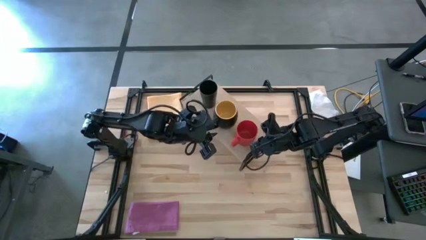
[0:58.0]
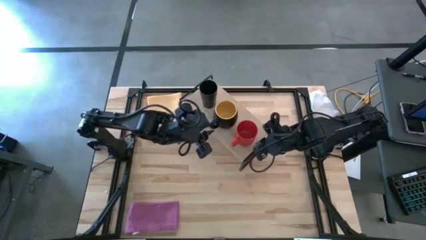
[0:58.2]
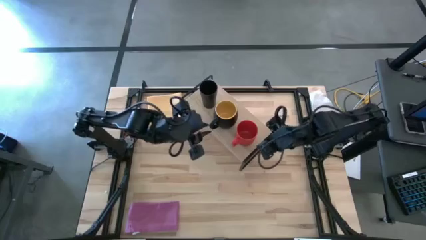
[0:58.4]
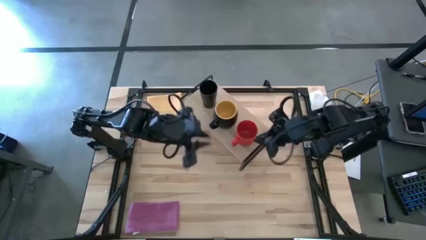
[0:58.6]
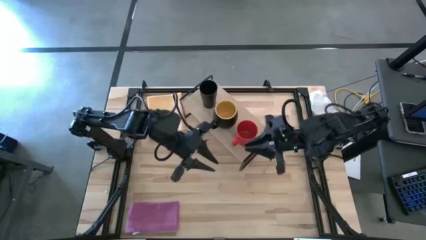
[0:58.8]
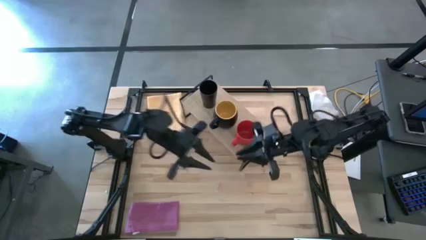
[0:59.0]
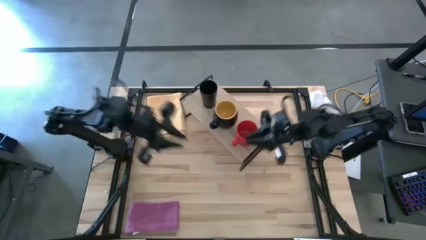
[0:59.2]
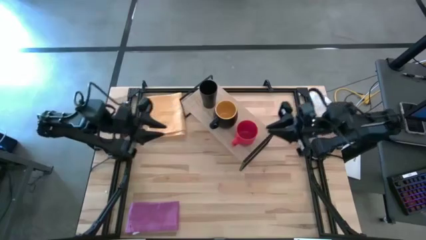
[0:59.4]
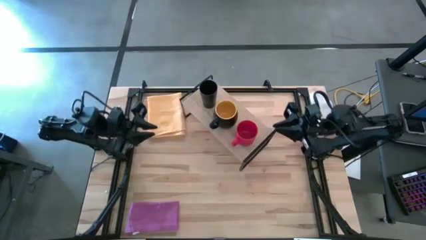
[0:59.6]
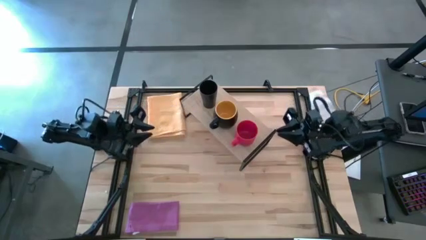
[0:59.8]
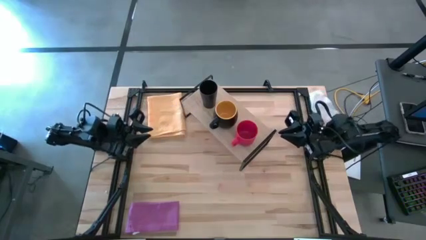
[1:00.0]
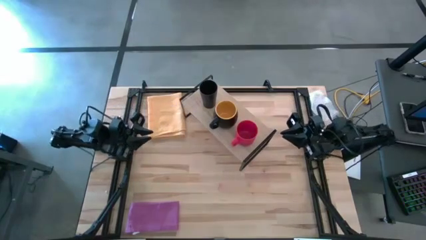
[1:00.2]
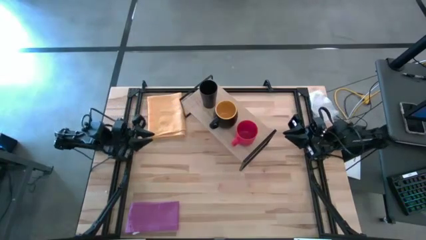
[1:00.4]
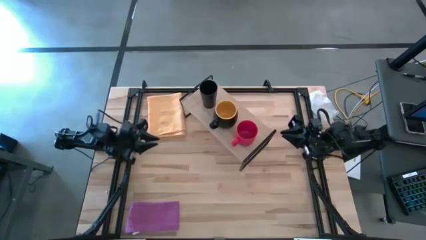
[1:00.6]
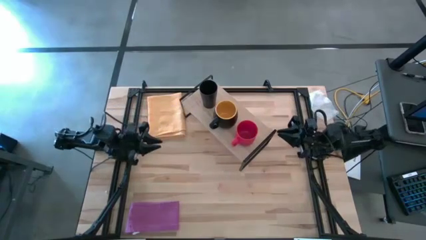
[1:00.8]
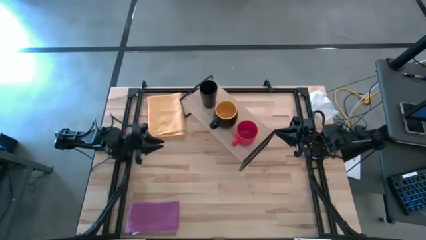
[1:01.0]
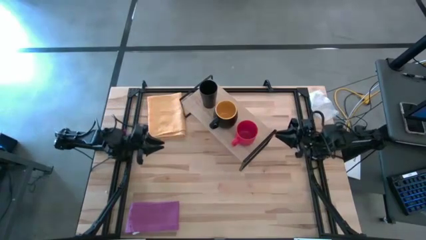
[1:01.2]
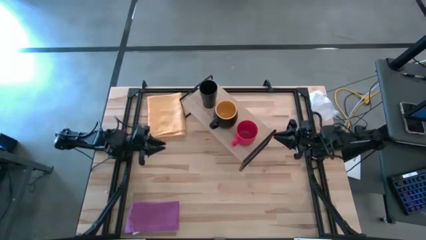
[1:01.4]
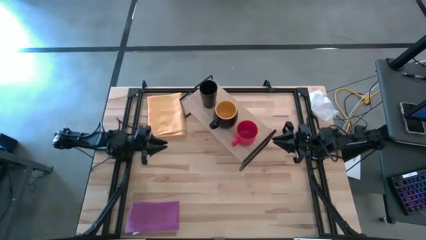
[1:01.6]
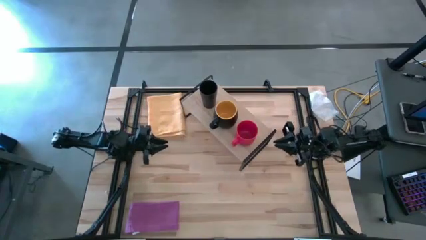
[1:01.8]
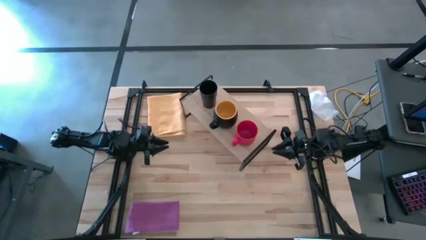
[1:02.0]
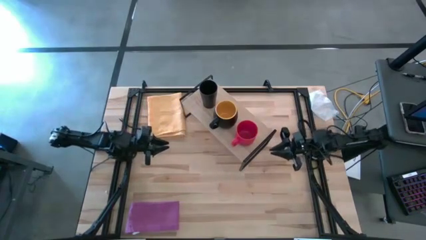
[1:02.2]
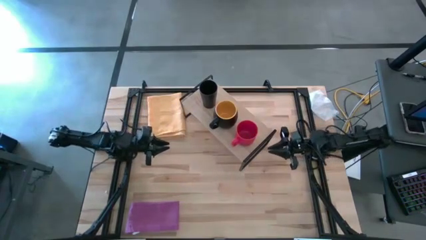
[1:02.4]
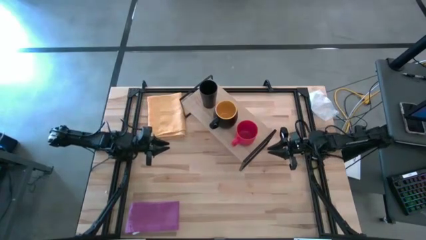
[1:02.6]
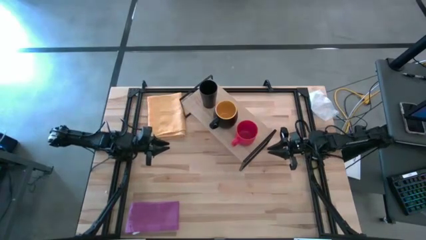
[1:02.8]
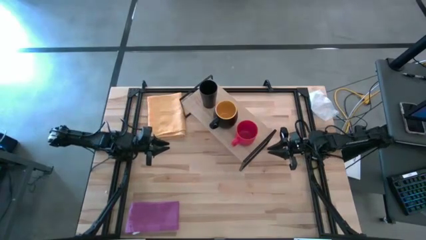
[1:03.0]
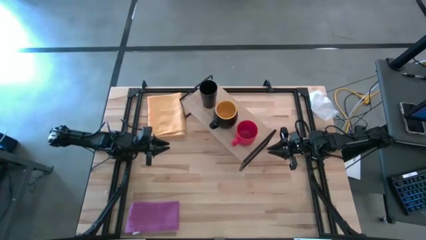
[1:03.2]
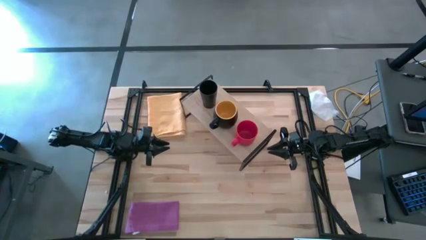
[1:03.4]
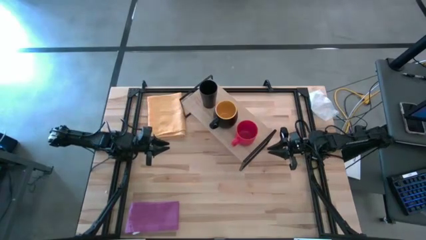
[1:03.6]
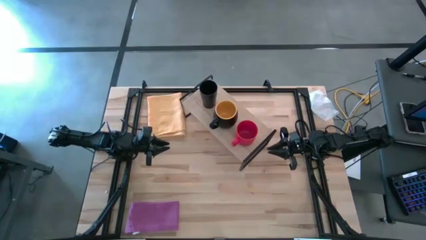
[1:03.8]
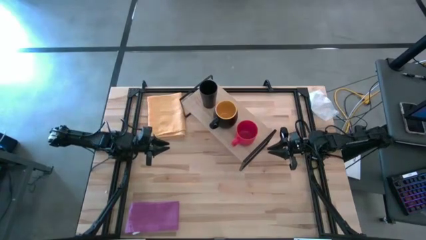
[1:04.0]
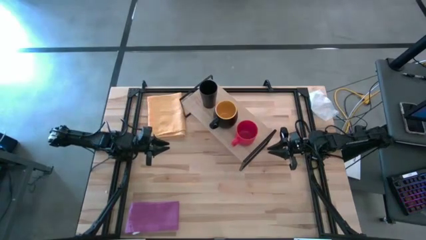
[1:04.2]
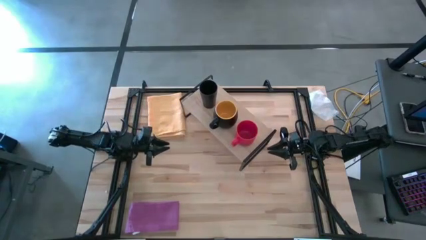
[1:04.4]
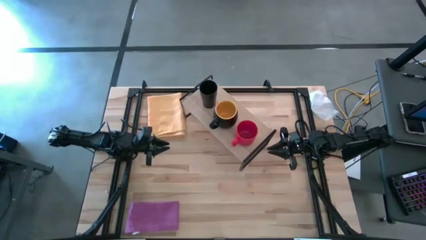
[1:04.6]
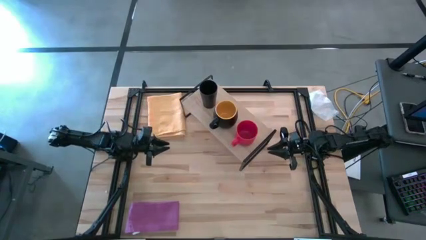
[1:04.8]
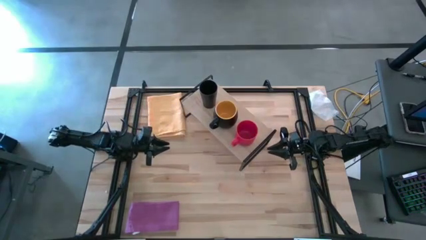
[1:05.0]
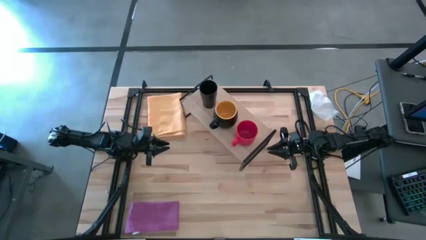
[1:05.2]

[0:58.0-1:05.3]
Task: Stack small to large cups/mugs on shelf
Return to Home Position

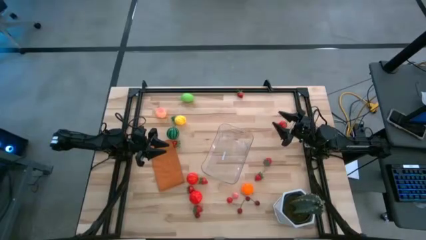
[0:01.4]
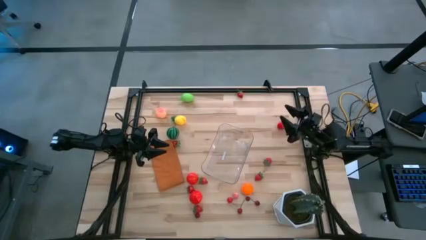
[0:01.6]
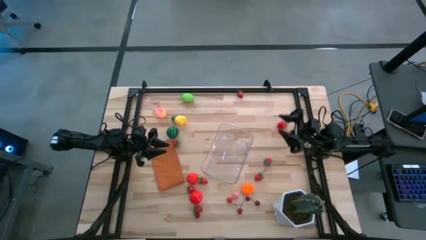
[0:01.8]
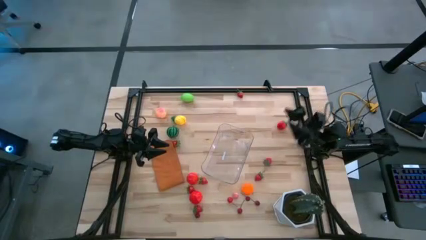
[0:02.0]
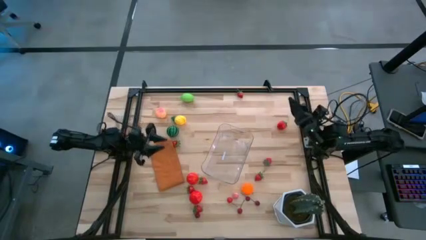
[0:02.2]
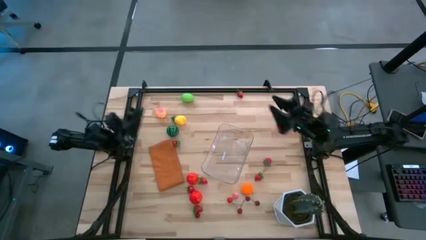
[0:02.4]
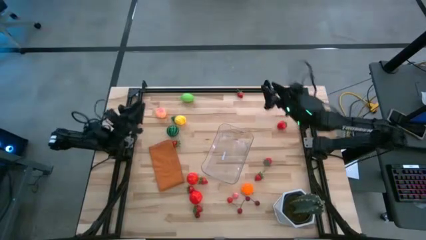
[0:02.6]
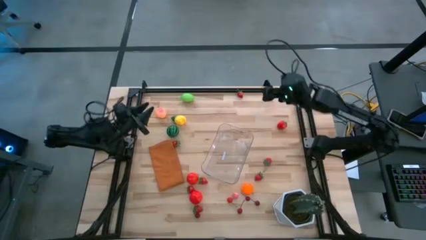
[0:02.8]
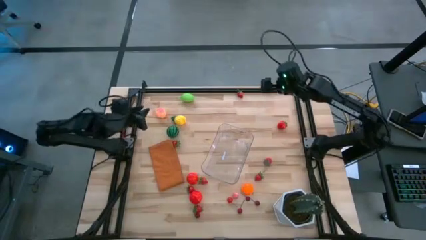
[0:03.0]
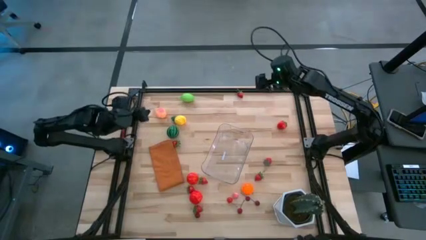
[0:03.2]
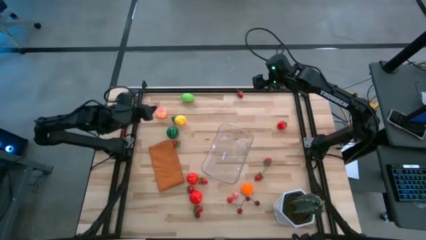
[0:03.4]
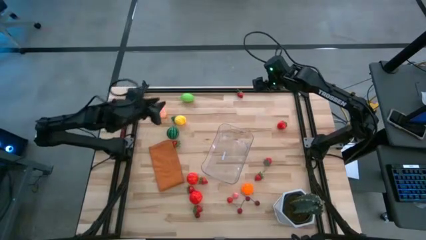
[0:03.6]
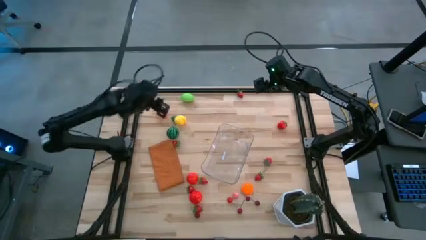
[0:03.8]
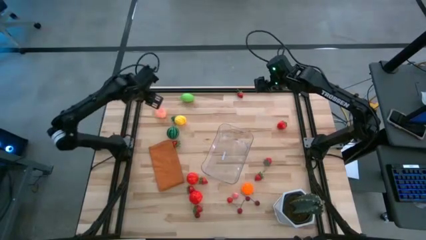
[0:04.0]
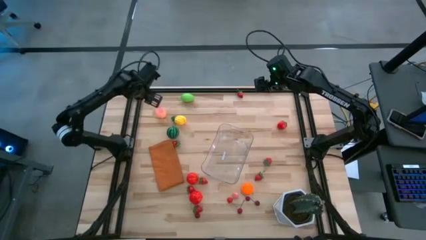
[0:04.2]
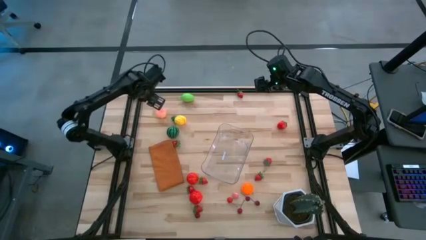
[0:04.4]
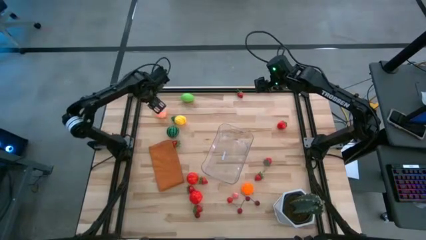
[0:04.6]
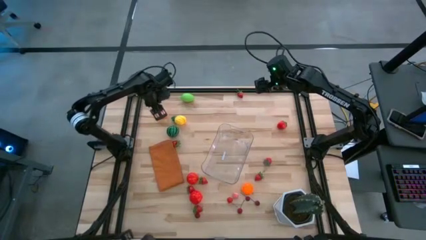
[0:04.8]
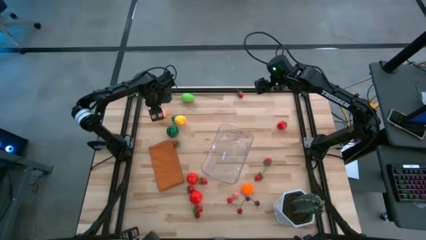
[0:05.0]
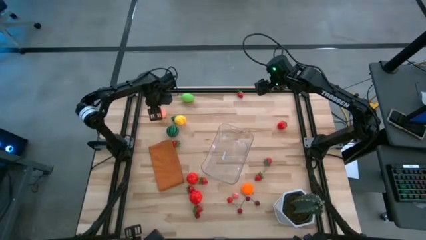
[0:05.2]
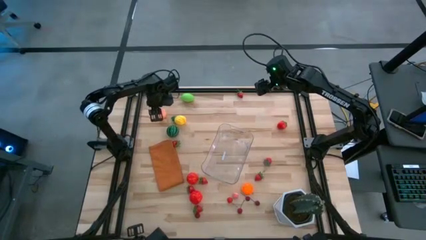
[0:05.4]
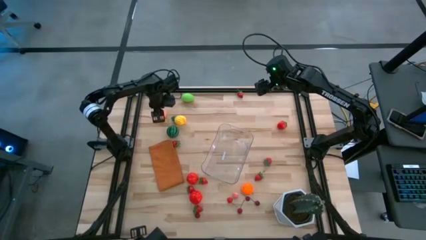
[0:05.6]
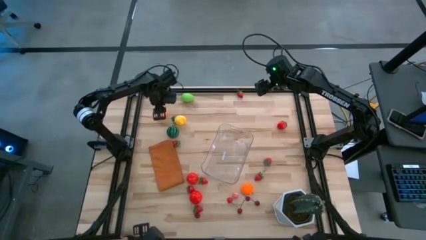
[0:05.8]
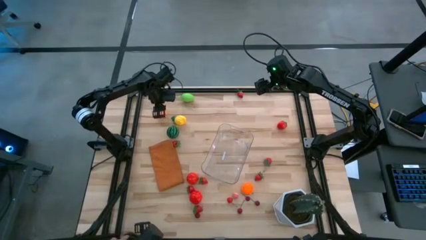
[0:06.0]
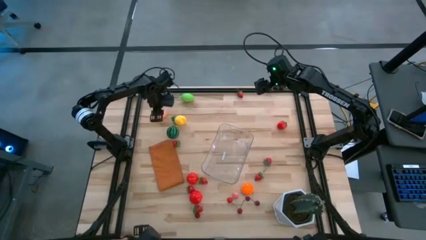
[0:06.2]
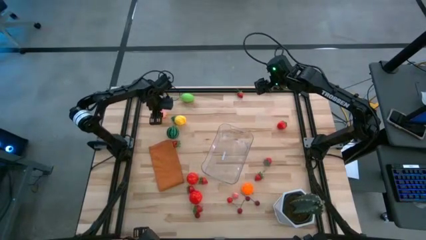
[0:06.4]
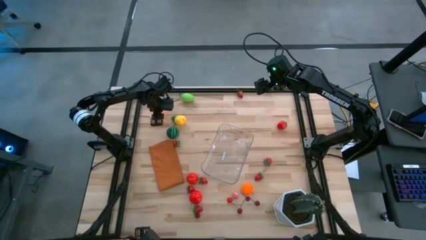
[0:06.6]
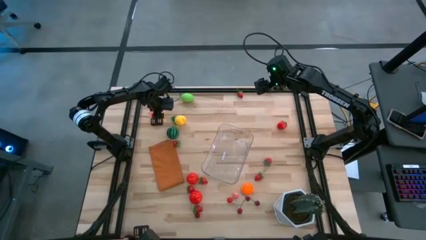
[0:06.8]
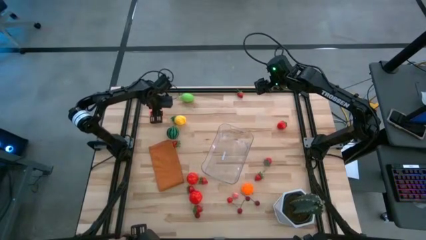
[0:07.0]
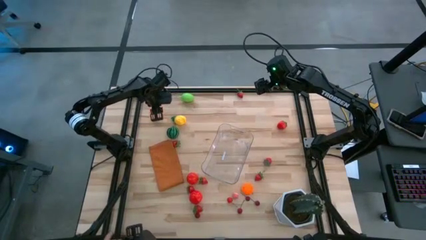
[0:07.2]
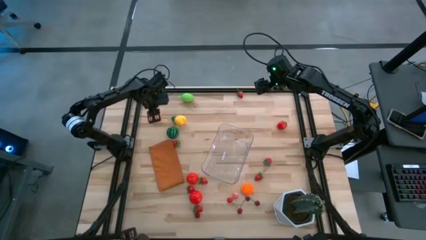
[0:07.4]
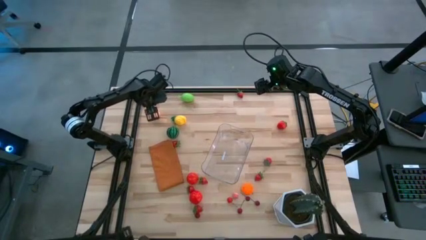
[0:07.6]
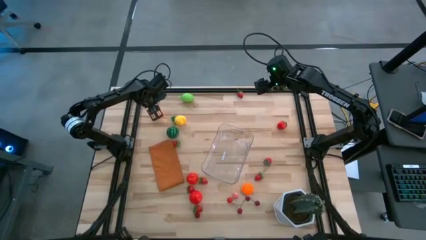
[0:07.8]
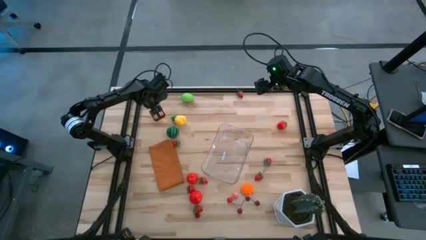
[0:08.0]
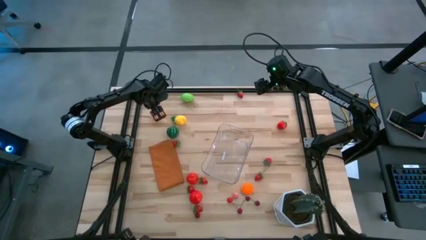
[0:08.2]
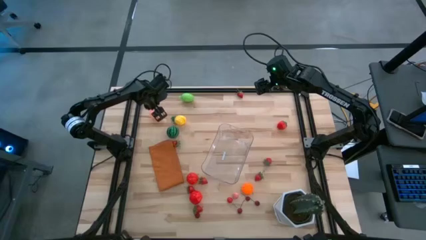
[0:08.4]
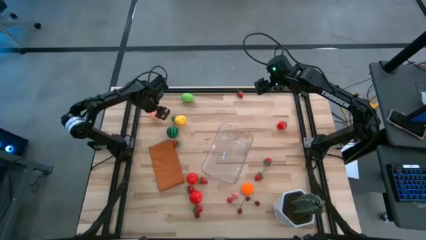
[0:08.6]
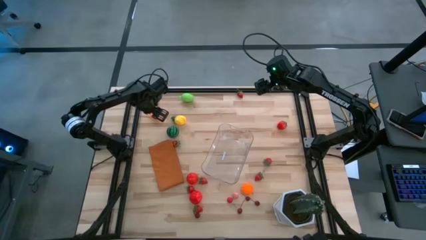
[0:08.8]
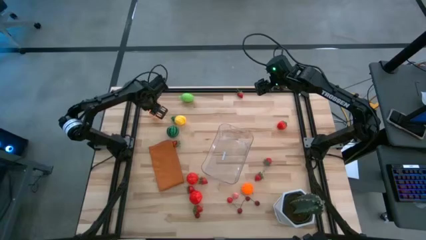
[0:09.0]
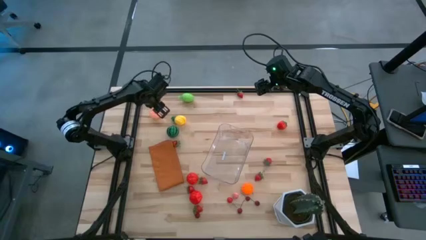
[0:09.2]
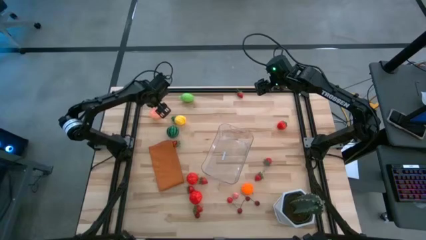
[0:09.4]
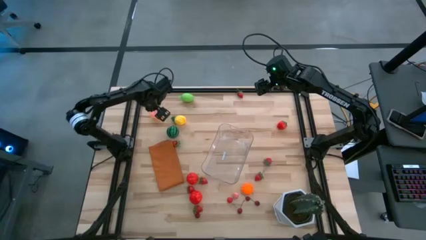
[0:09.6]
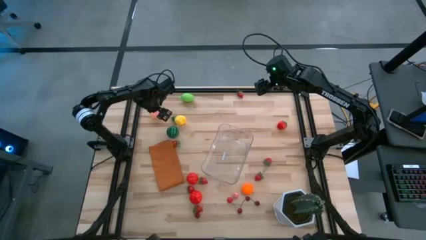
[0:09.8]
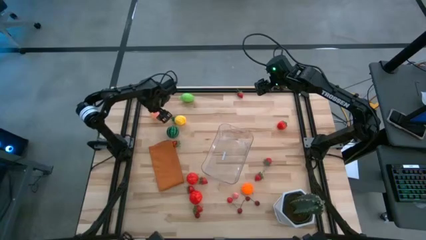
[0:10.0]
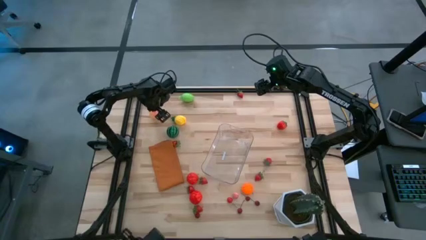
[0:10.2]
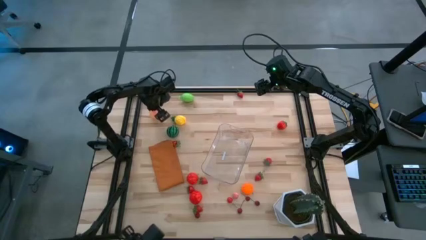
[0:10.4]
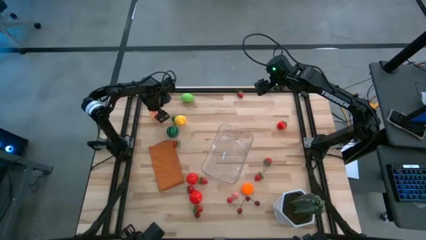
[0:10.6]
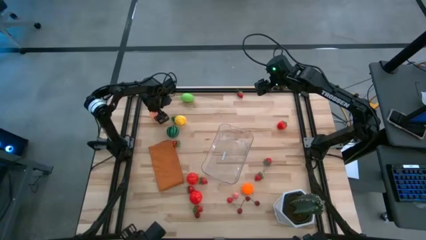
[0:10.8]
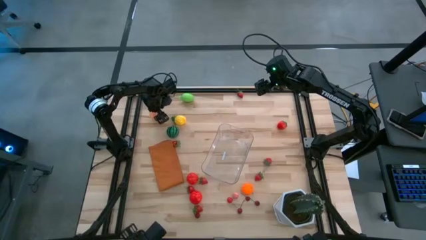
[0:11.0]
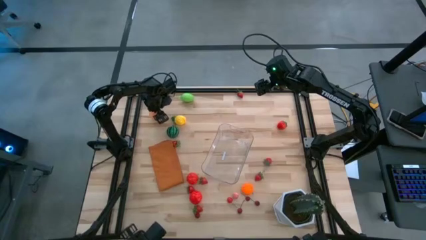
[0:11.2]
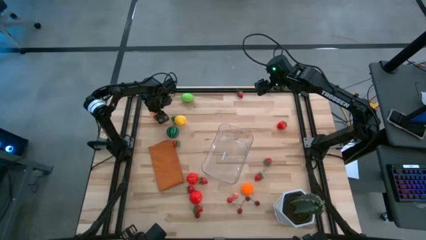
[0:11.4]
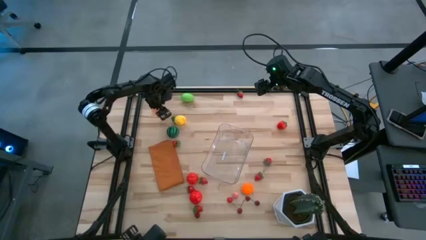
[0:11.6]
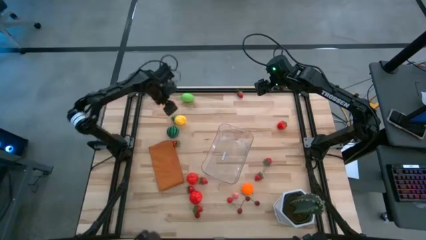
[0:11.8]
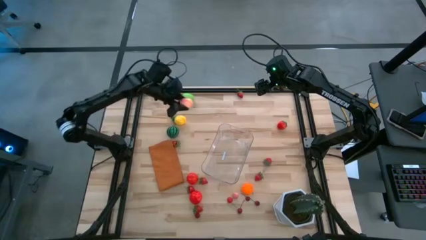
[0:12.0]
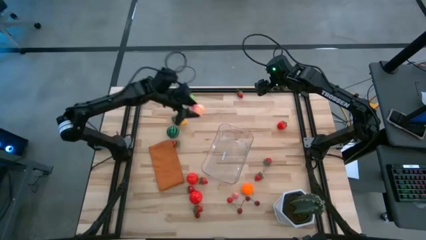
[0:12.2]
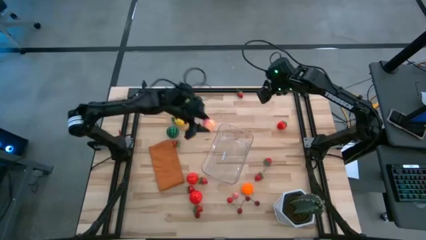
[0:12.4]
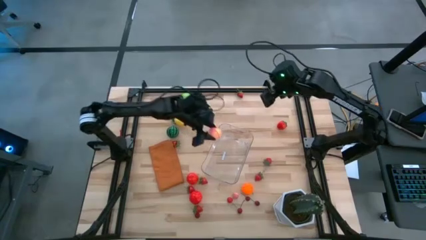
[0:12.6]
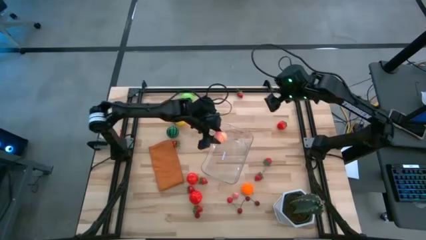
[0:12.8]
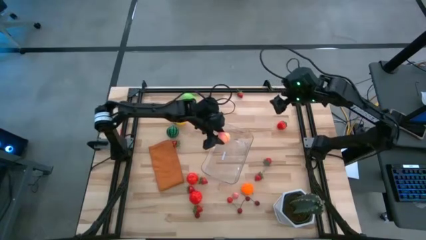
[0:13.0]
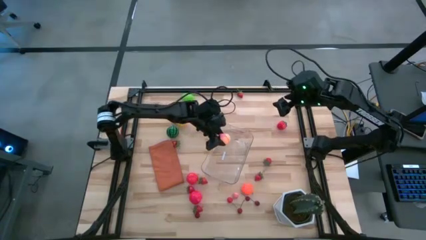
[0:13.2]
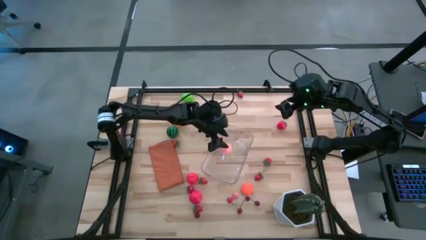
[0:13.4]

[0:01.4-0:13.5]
Task: Pick and placing Produce into tupperware
Put the pink peach into the transparent bin
